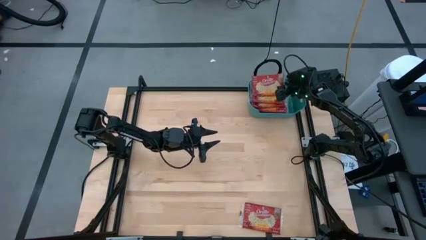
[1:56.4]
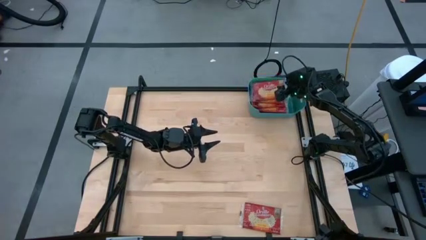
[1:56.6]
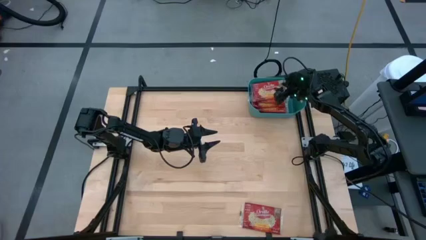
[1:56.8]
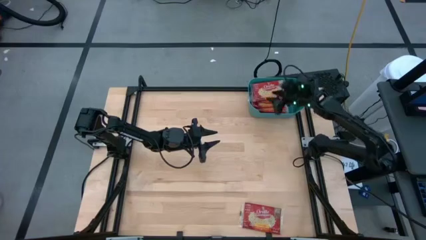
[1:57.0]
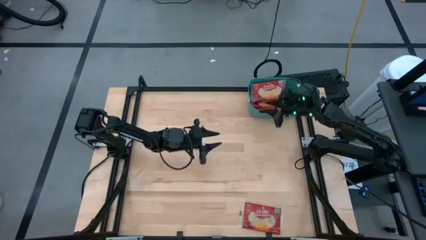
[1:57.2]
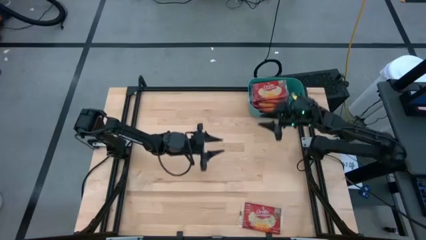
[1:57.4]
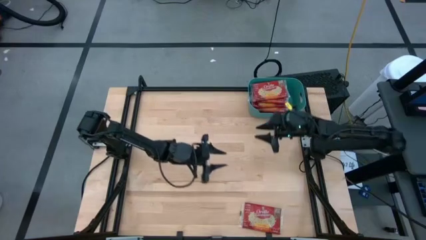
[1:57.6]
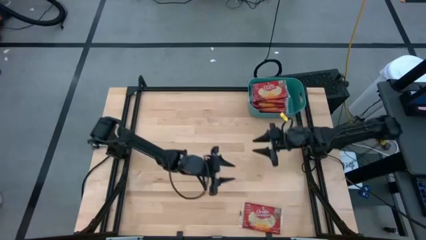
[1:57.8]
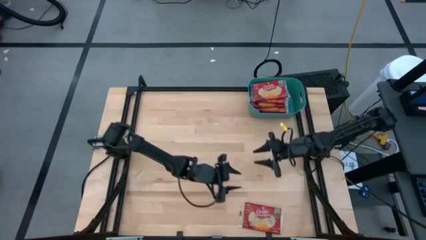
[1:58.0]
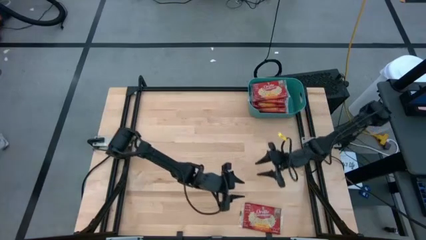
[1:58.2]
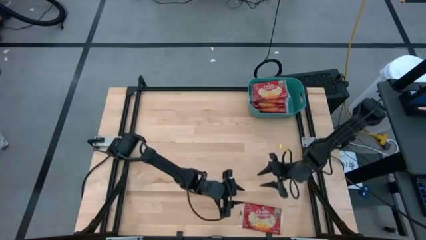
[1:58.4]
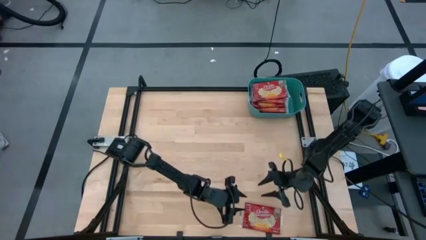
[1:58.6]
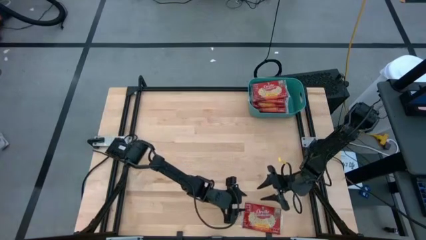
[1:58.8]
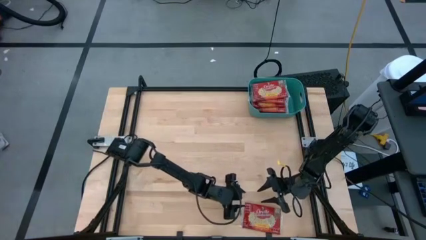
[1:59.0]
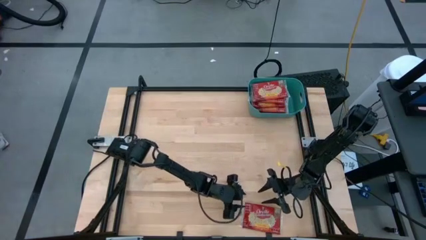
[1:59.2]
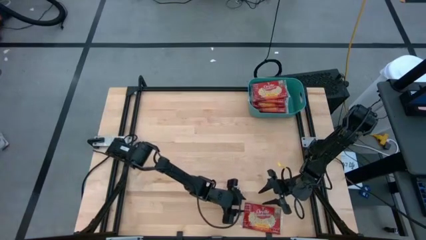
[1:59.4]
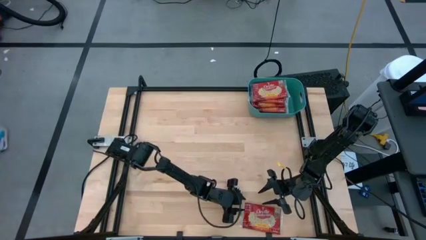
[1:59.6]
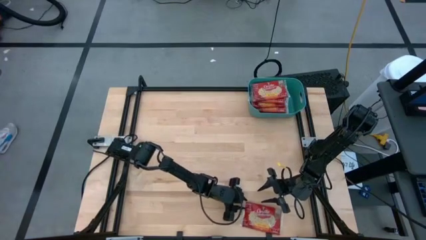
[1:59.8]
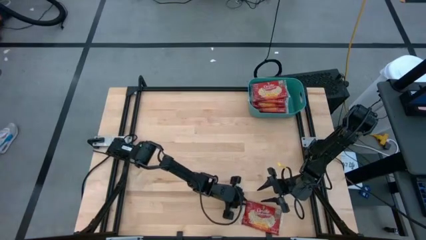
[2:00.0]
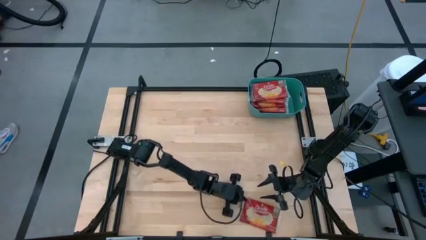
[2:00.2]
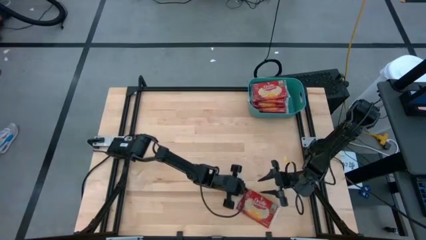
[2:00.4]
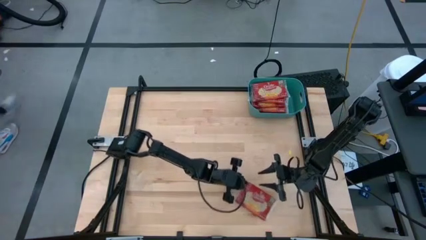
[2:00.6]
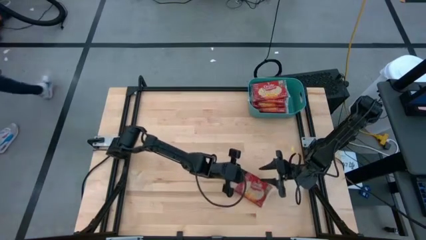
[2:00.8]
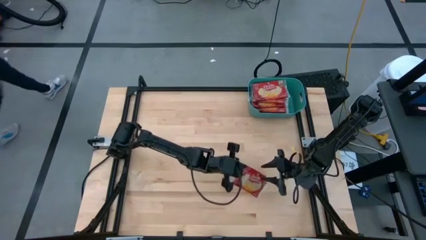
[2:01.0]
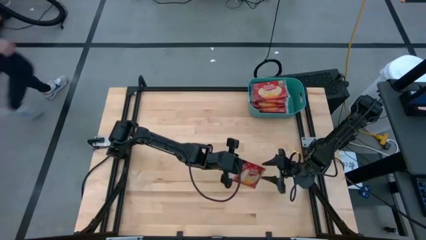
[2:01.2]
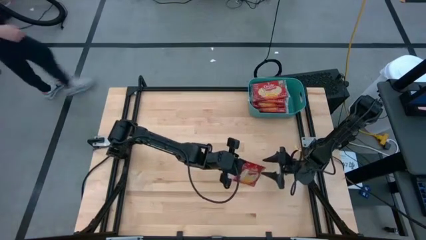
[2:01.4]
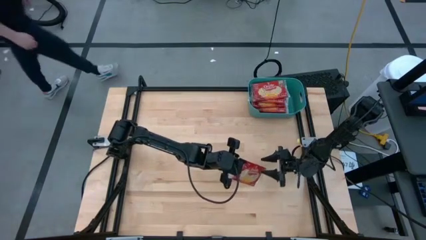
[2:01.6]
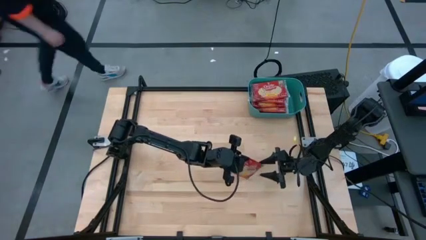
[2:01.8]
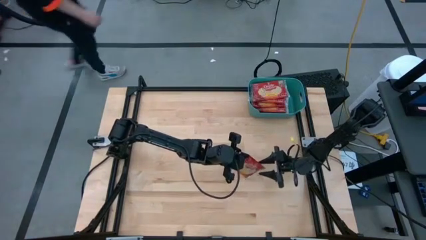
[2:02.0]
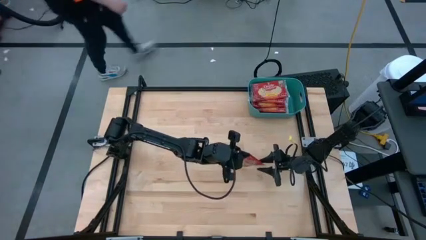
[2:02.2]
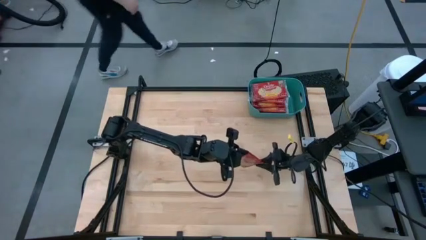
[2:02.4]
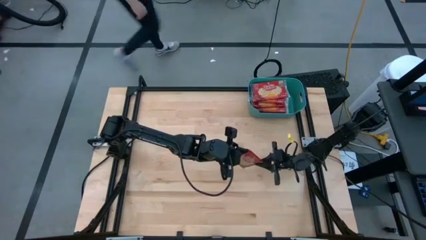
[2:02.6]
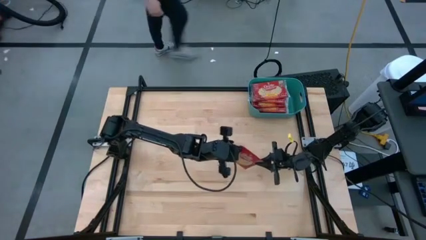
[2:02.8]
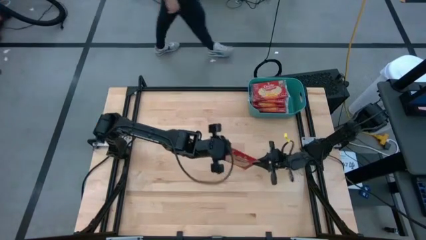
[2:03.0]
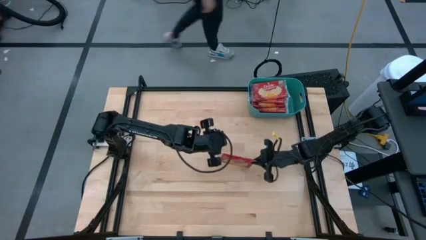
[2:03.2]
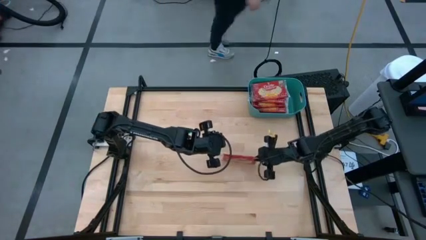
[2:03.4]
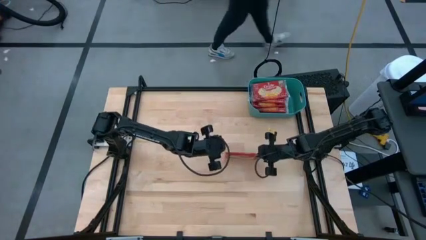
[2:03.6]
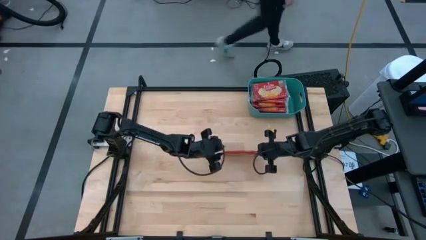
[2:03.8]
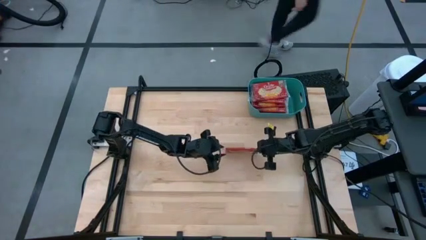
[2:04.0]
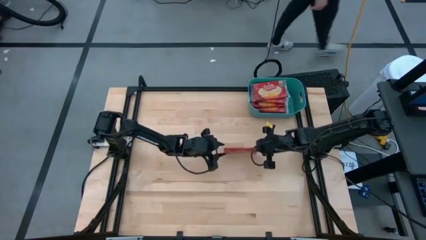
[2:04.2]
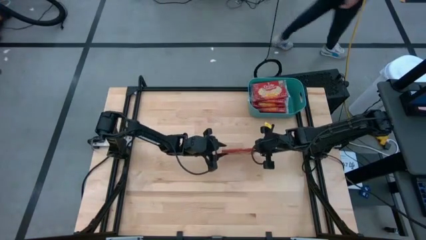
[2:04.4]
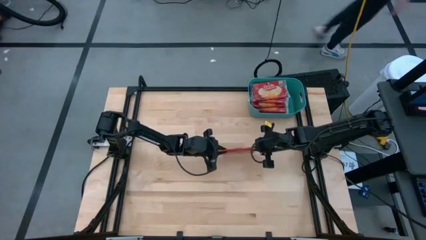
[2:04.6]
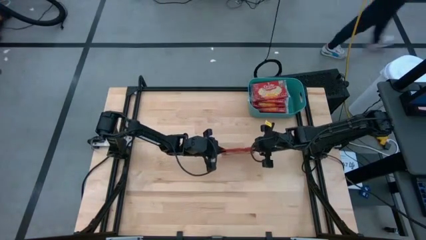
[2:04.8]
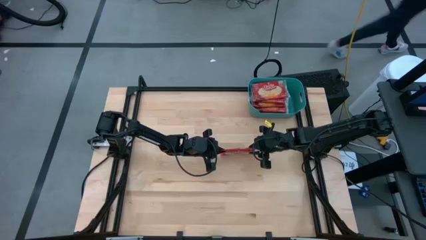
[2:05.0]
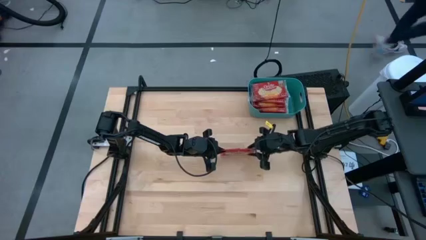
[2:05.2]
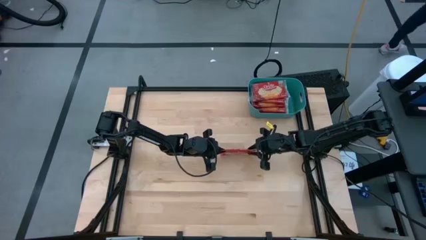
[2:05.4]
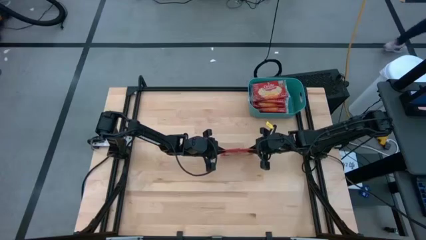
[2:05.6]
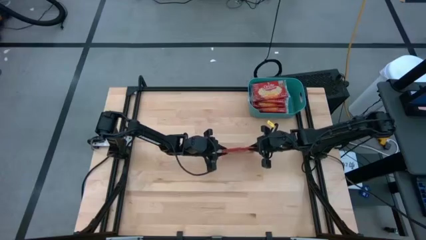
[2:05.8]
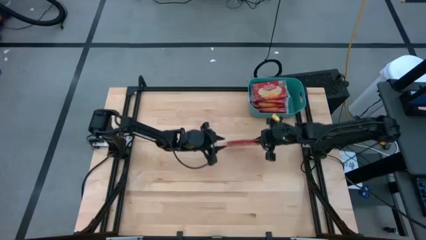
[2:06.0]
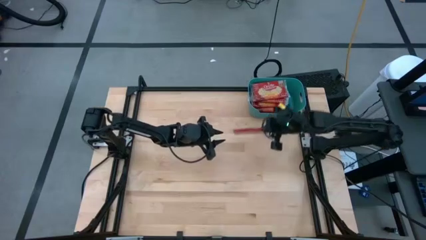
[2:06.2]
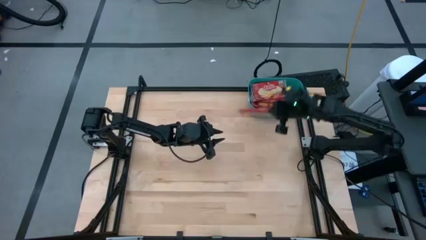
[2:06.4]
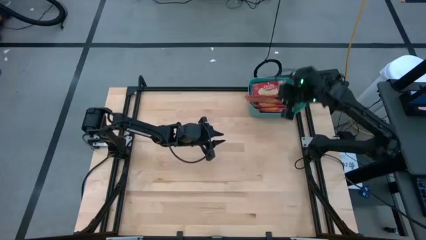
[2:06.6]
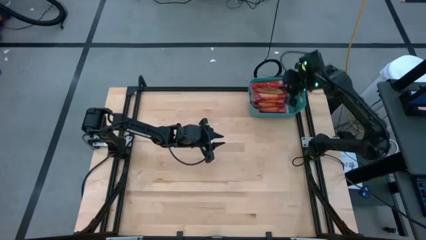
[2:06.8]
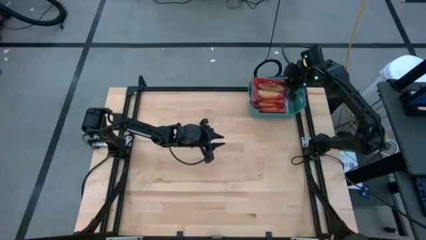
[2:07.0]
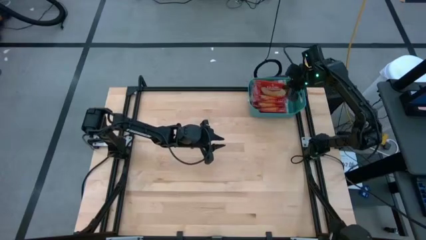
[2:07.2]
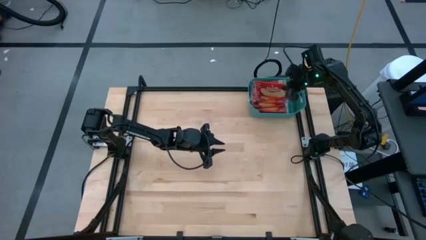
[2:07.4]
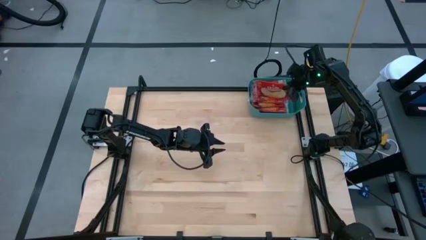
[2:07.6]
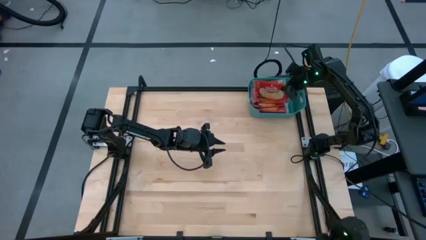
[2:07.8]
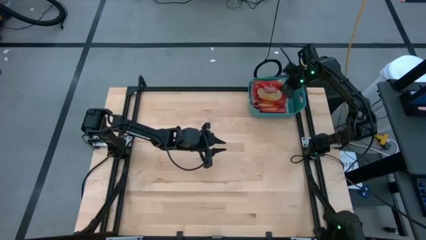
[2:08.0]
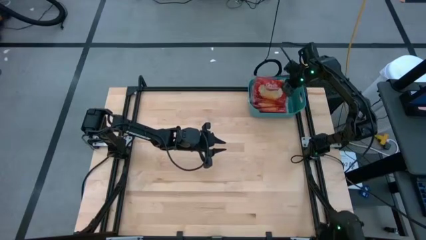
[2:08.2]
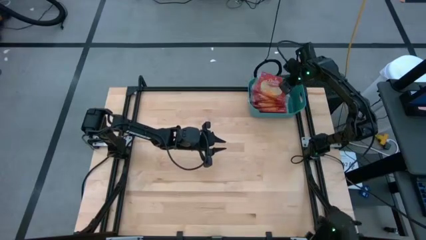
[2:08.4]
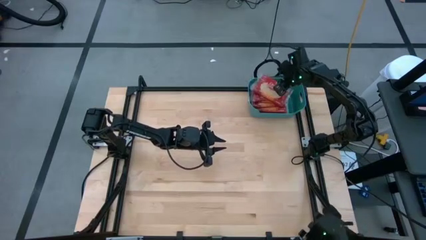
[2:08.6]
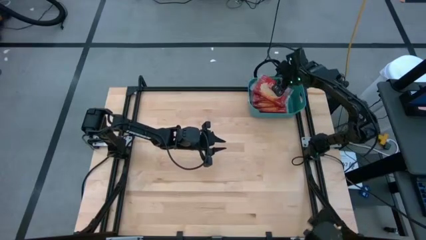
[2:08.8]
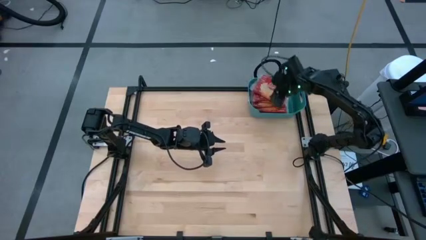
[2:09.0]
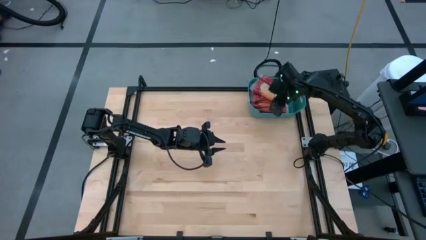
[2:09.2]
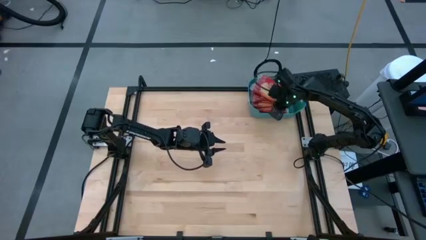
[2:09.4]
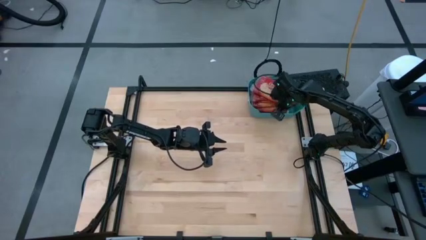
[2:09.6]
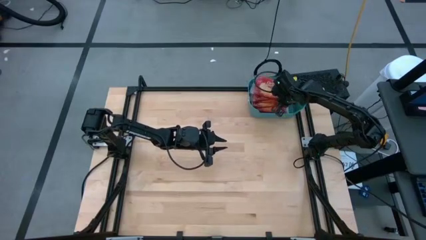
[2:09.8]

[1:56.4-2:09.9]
Task: Sort popcorn bags into baskets
Put the red popcorn bag into the blue bin

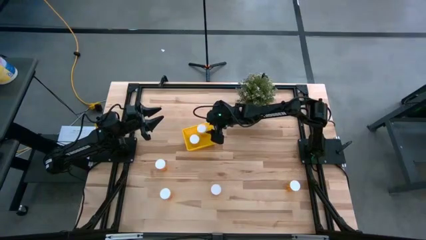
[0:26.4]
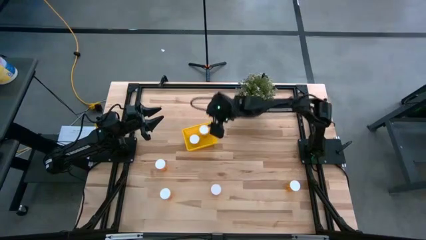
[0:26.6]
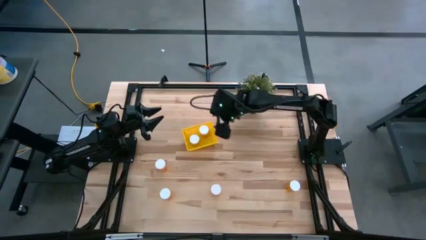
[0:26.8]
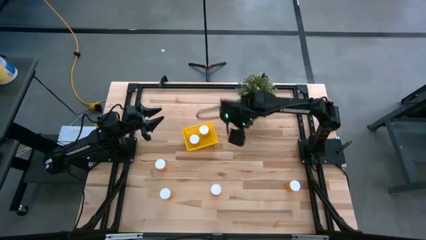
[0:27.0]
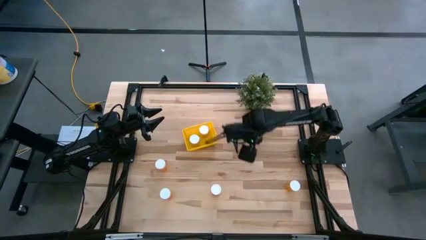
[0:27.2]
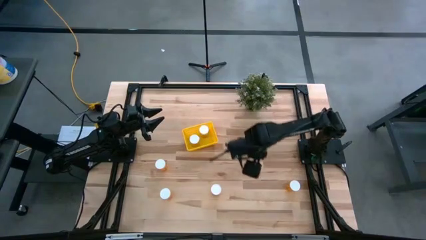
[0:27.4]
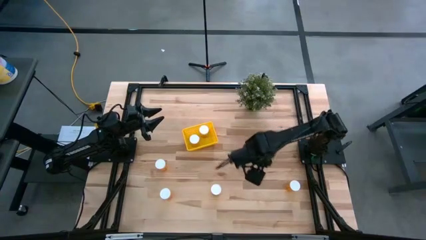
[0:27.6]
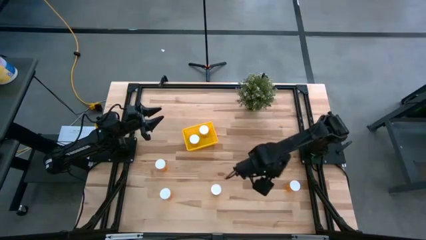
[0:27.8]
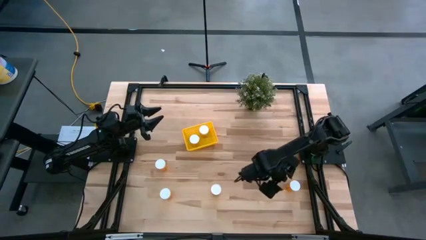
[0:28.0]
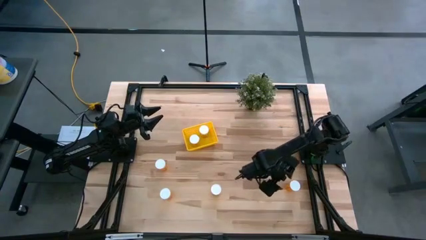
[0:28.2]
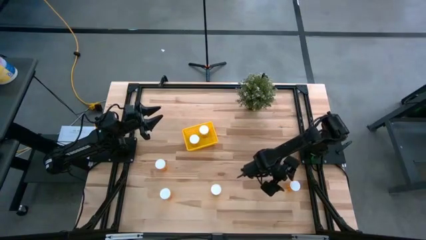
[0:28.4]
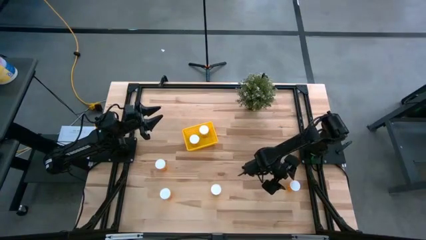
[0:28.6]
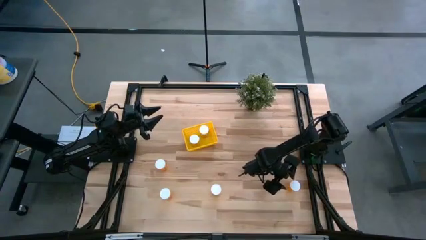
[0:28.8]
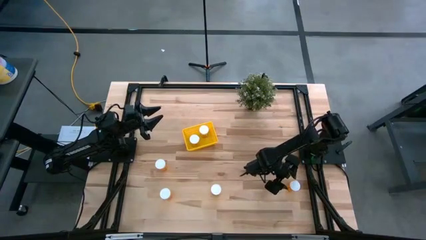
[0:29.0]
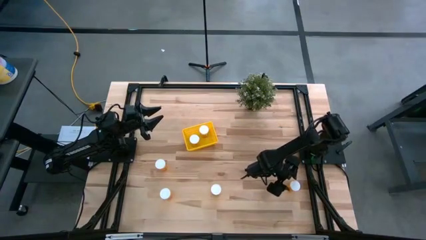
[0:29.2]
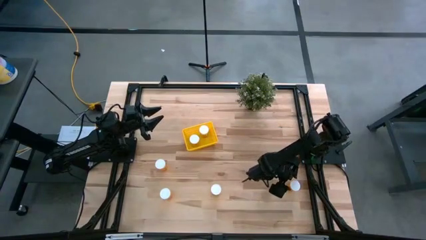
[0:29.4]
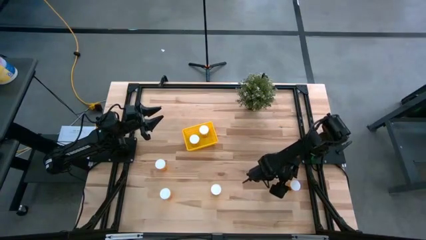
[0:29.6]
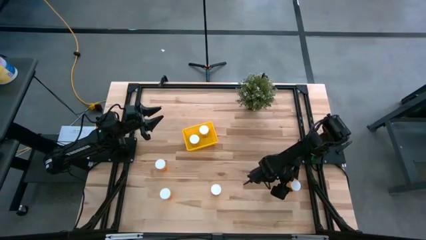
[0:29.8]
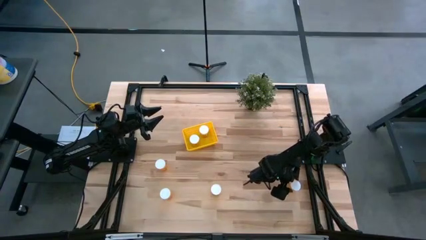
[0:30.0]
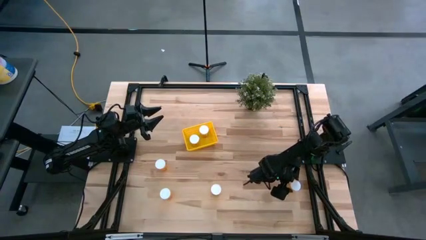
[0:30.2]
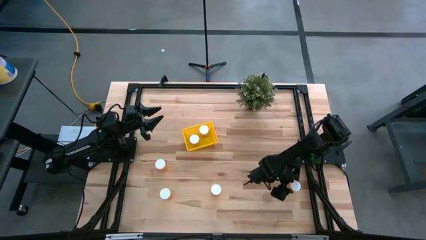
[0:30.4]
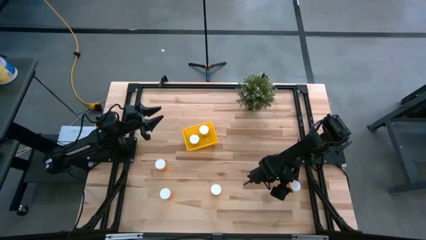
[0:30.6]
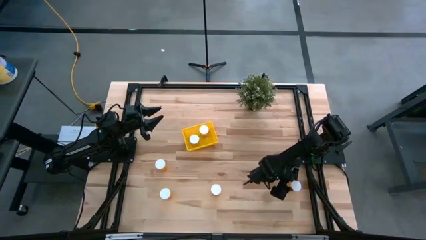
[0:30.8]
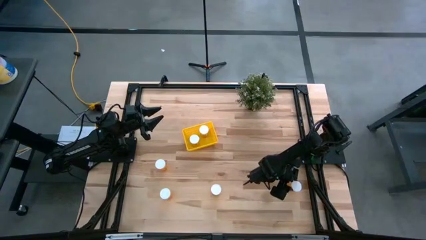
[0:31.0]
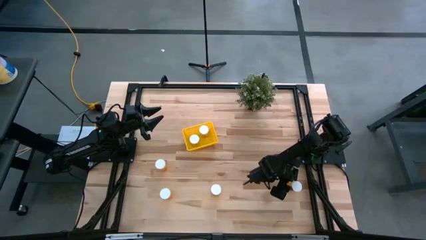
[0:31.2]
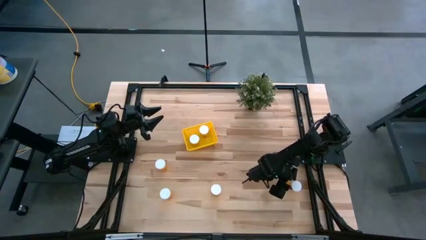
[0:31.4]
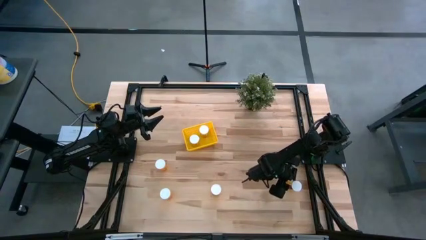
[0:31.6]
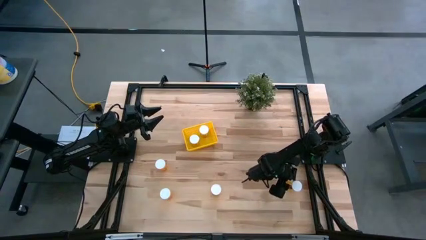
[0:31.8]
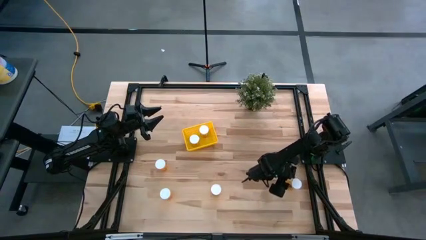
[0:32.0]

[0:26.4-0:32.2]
Task: Pick and place pill bottles into a basket
Put the orange pill bottle into the yellow bin
